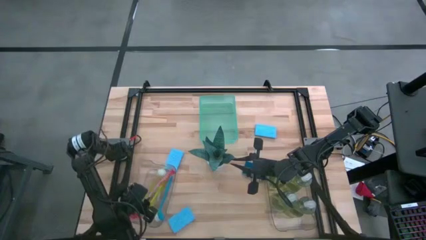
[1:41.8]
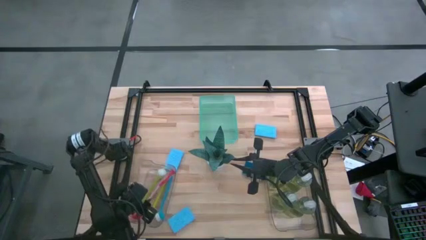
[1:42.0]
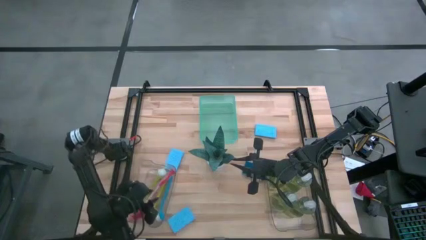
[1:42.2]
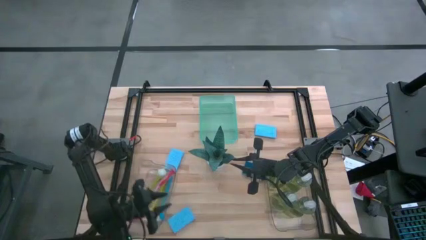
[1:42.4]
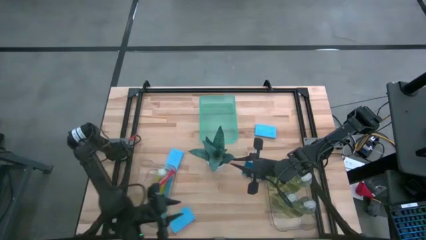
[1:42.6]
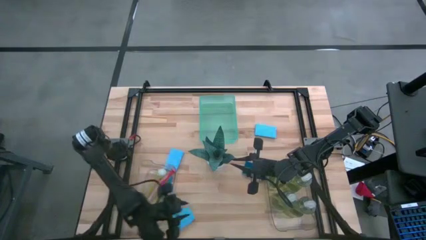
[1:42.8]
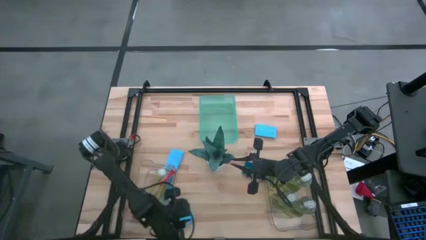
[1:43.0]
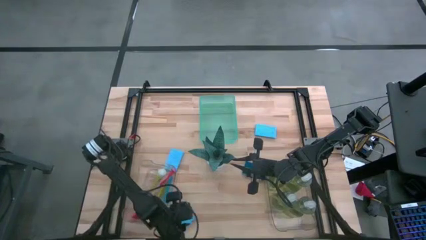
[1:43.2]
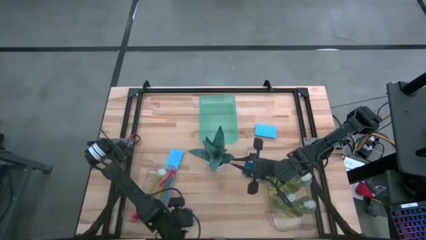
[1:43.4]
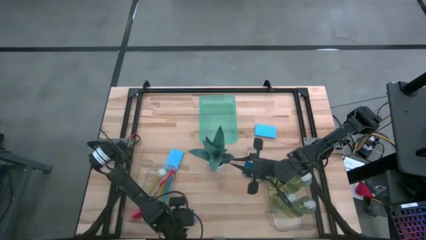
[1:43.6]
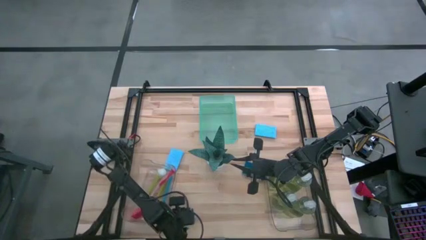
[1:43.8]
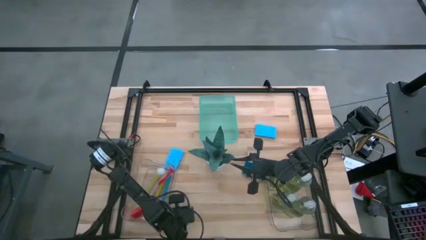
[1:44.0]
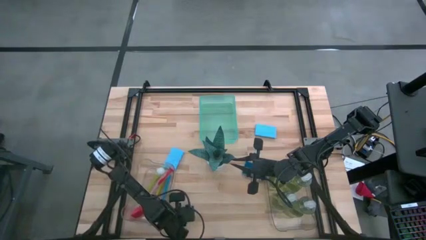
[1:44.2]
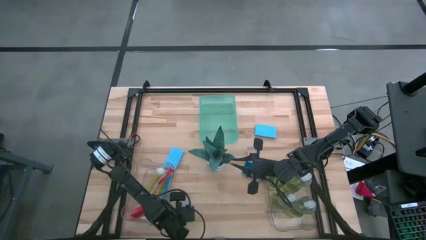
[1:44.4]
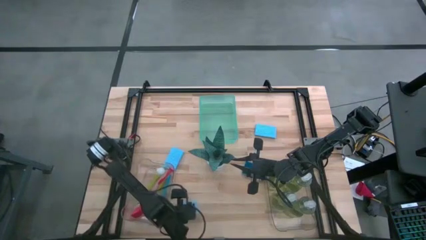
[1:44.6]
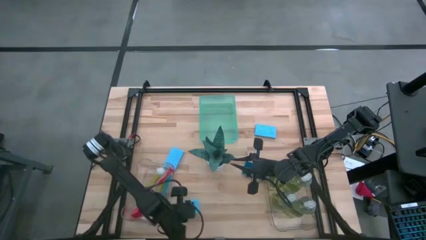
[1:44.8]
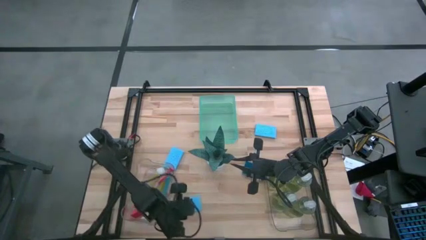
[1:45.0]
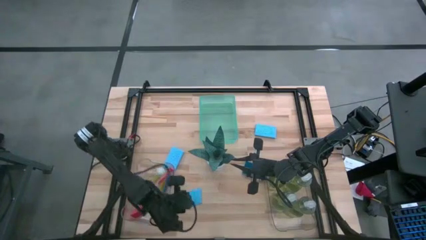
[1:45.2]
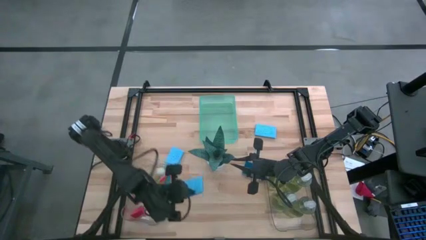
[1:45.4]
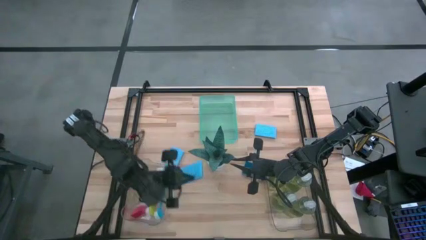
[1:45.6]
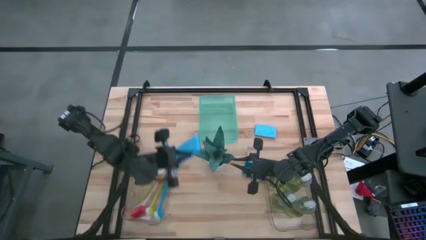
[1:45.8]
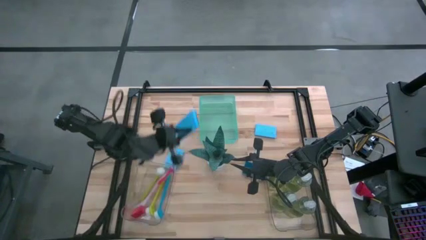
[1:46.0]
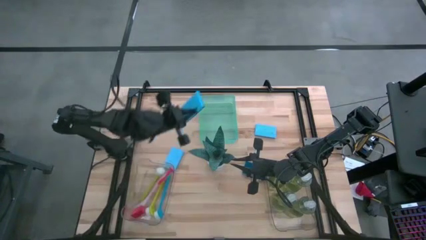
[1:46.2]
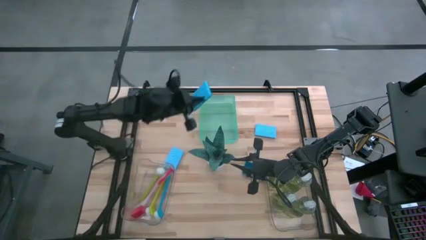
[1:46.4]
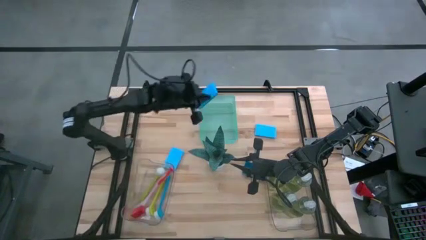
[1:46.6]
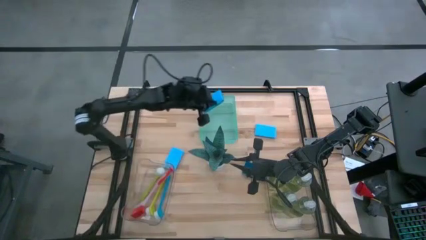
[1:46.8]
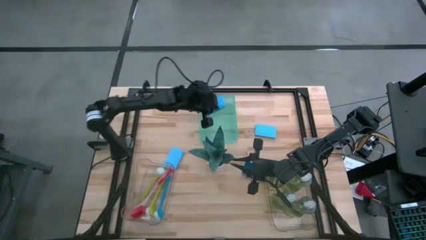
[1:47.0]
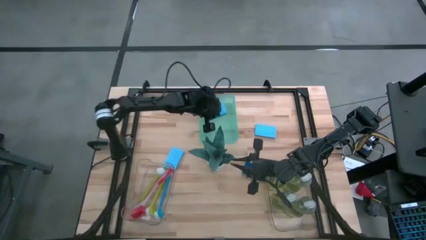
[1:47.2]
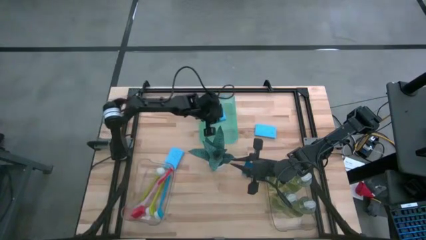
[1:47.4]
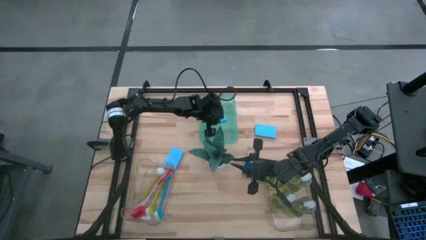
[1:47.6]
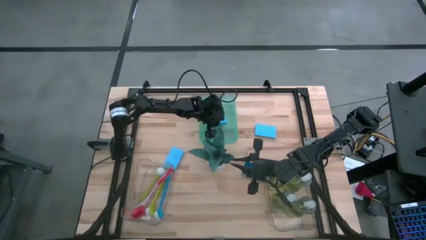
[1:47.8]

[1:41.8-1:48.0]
Task: Pick & Place Kitchen Sink Supplies
Put the blue sponge into the green transparent bin

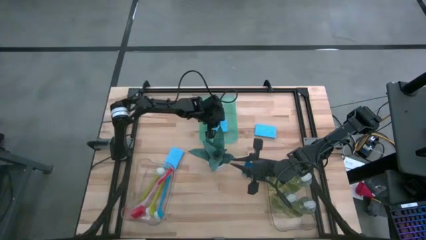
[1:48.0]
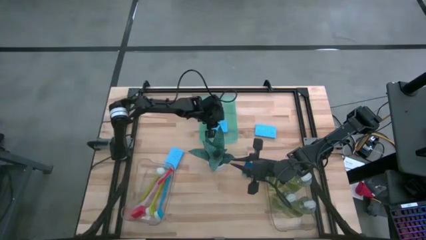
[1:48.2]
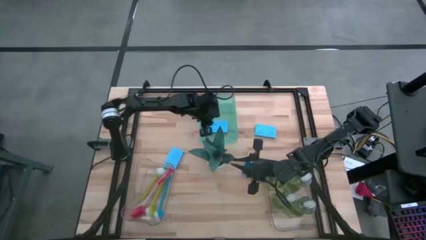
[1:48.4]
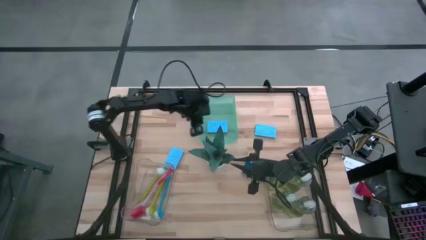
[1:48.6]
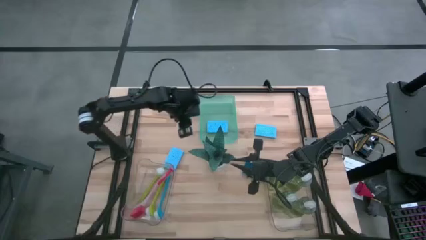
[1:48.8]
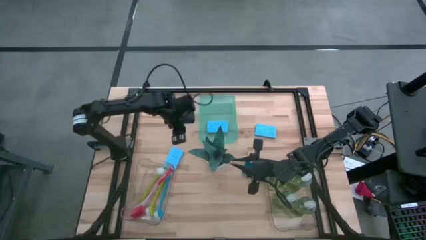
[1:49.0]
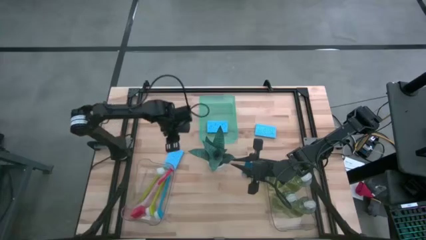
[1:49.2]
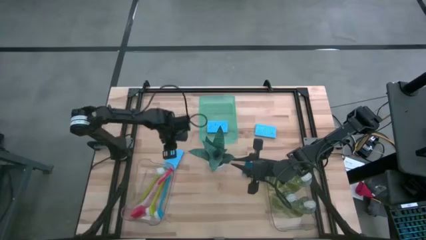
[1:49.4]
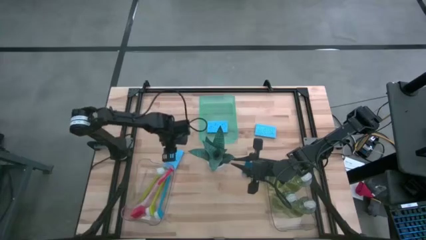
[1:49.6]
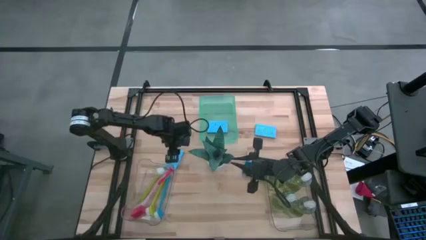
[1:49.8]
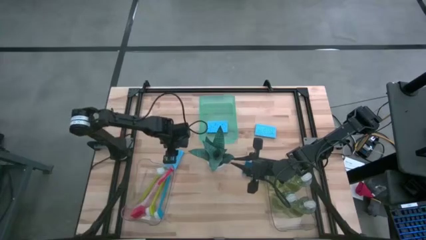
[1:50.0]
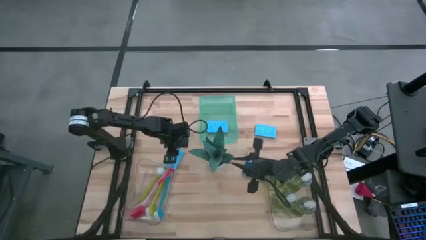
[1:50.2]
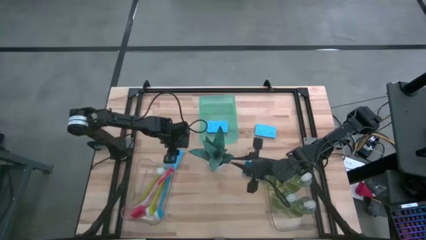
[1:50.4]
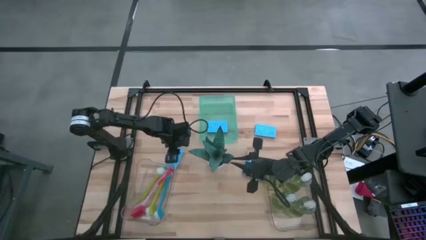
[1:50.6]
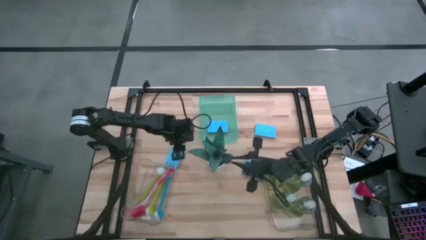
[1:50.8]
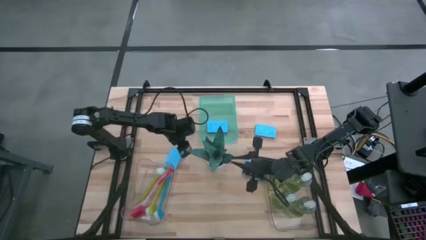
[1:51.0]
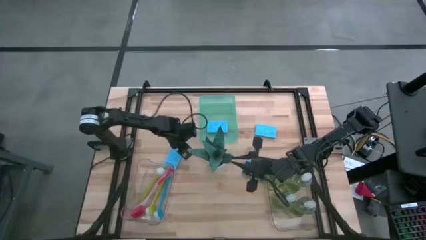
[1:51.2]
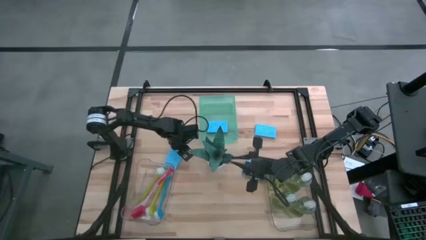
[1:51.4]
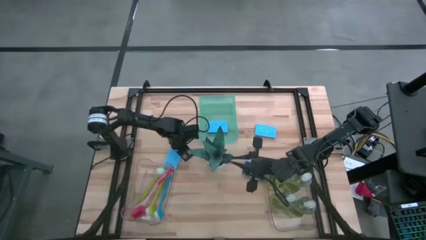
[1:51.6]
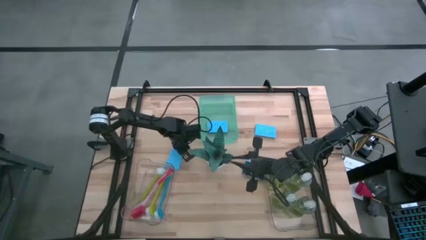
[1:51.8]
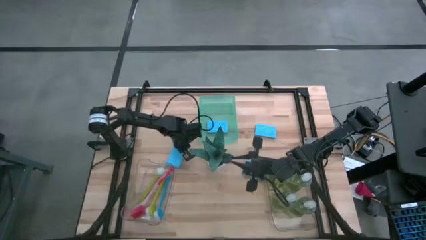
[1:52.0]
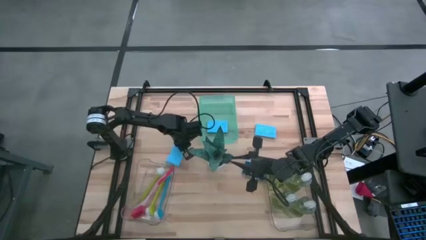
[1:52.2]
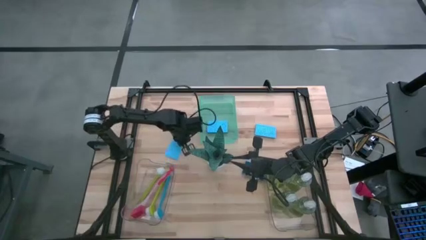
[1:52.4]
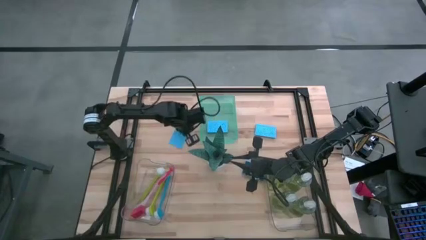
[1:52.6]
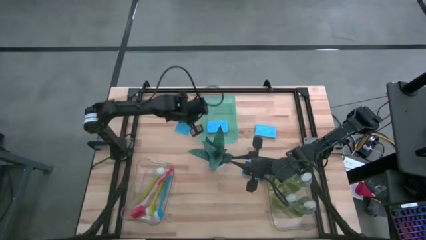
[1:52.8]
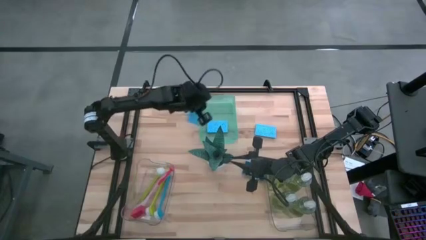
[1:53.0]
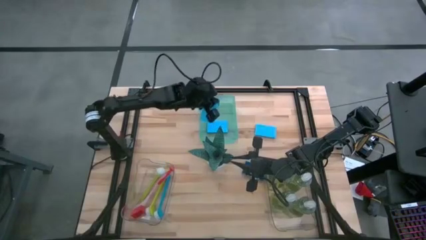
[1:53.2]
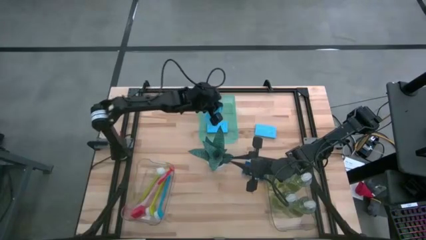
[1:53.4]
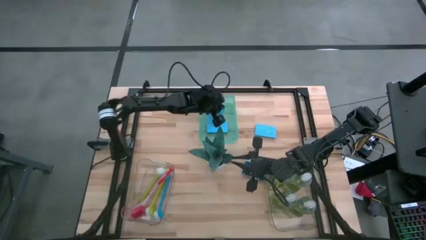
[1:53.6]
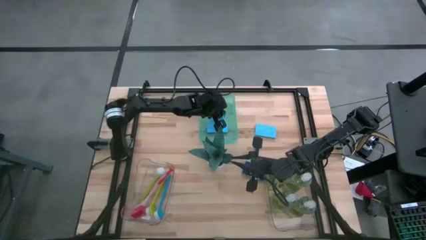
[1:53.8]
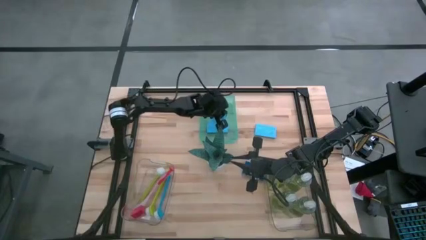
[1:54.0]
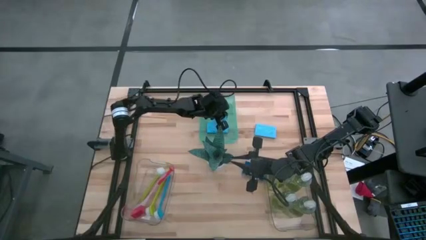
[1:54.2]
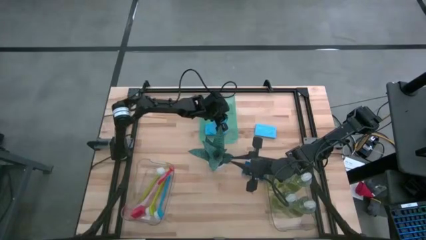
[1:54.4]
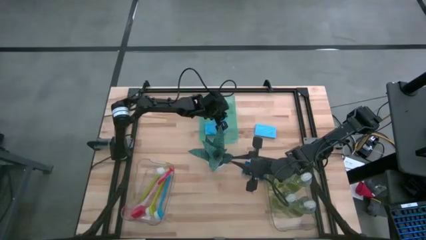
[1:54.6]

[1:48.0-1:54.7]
Put the blue sponge into the green transparent bin
